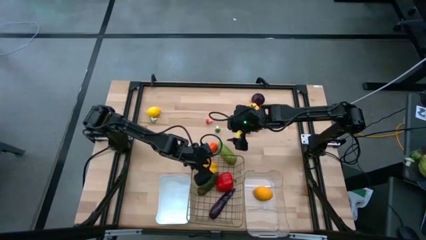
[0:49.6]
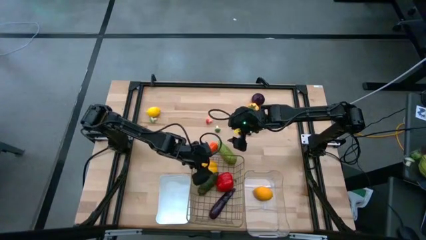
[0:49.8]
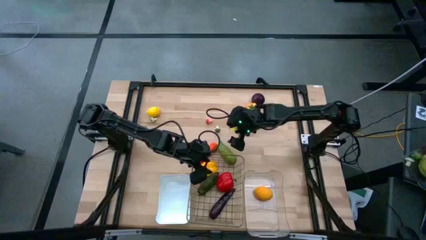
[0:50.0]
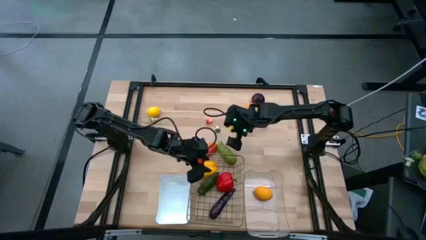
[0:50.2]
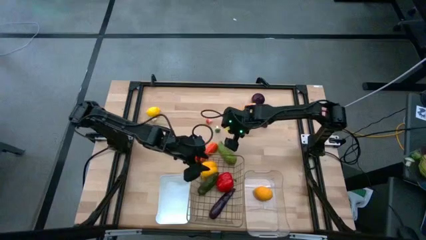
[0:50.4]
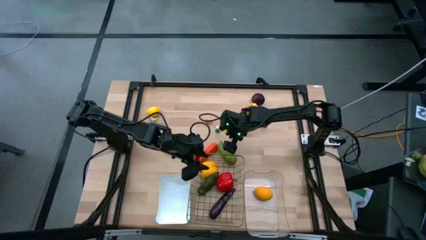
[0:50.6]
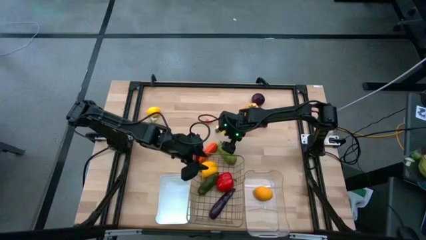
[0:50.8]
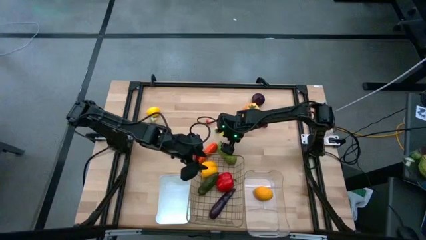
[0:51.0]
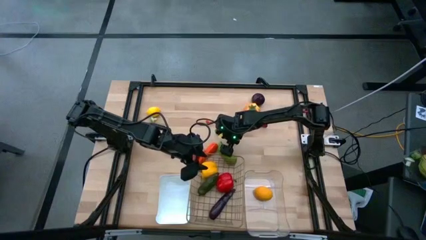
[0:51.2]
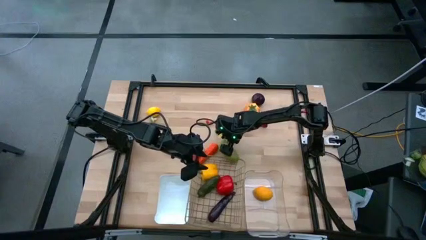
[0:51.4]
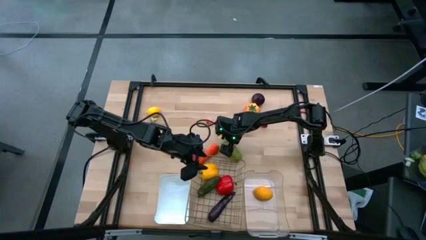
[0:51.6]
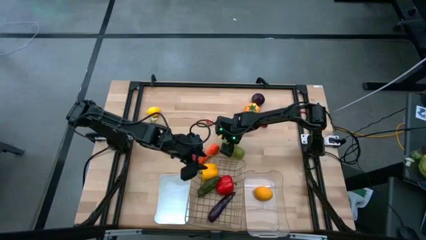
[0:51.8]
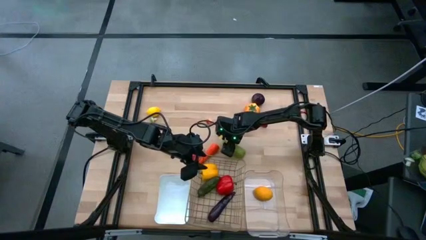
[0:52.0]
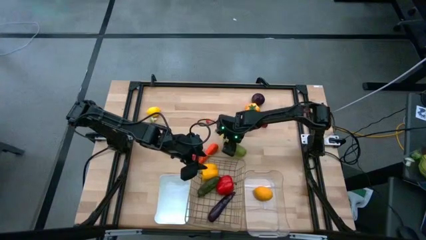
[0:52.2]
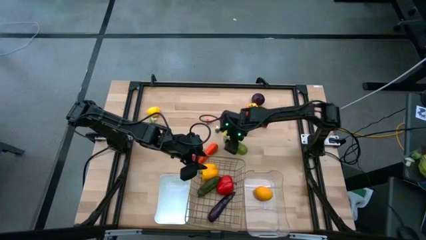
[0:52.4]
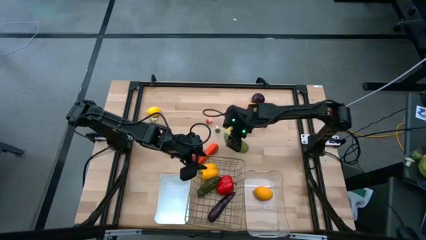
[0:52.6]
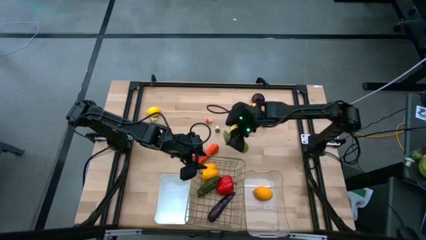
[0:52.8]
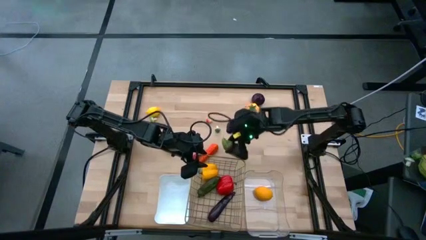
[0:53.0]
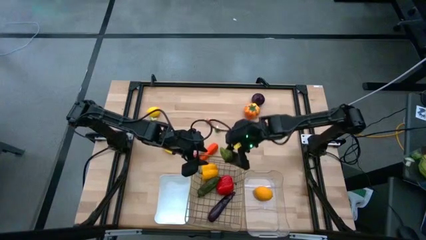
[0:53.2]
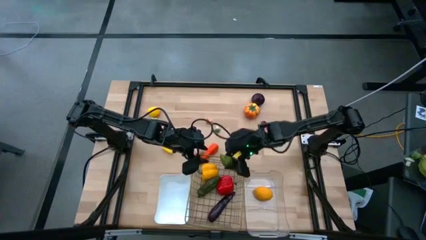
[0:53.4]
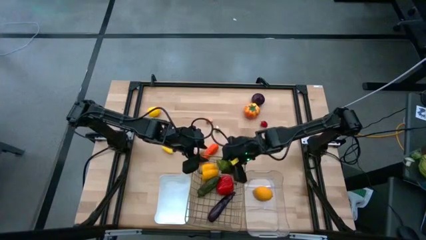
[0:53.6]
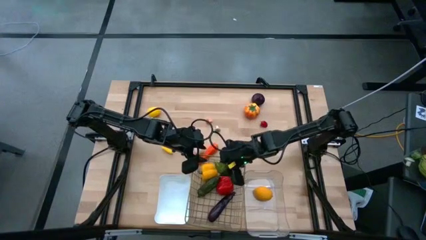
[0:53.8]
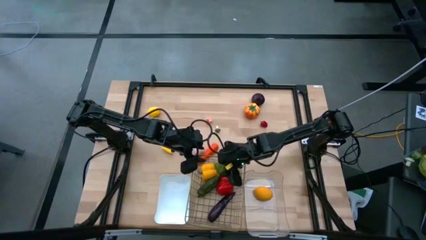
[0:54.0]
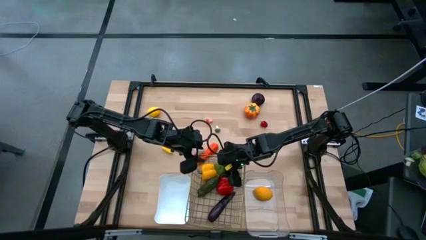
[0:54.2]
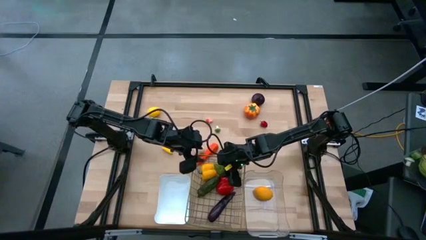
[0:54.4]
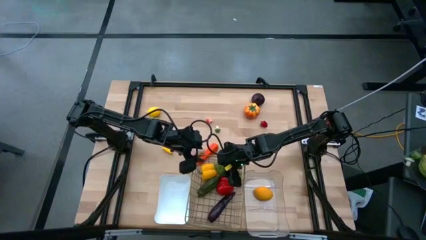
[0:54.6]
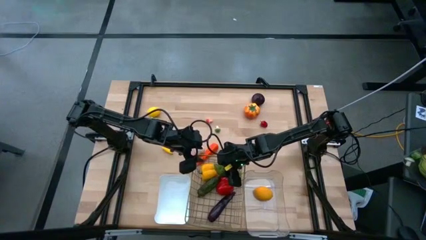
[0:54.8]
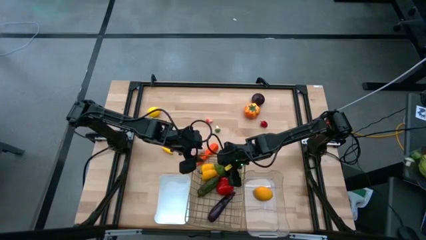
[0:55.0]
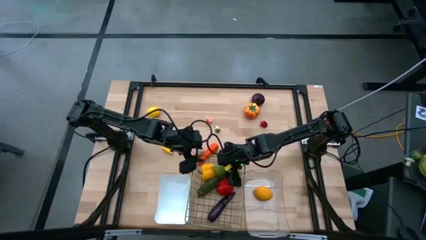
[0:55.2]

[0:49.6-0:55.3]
Task: Sort produce into baskets
Put the cucumber into the wire basket

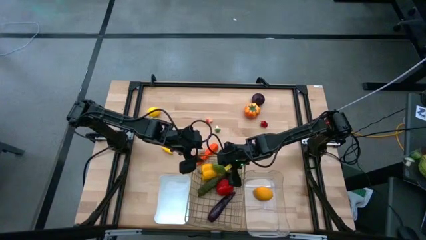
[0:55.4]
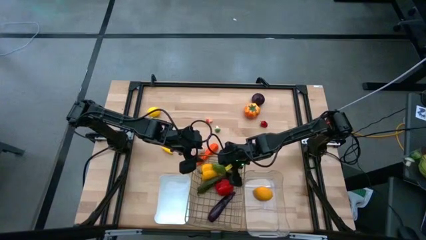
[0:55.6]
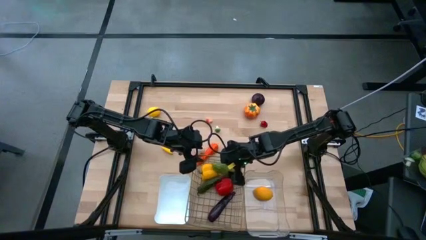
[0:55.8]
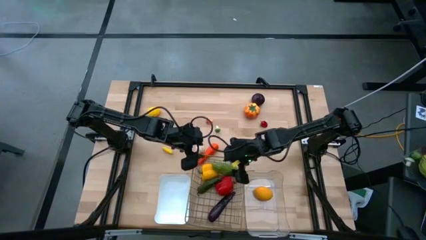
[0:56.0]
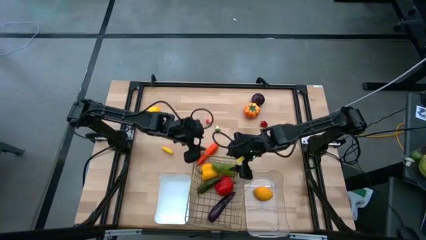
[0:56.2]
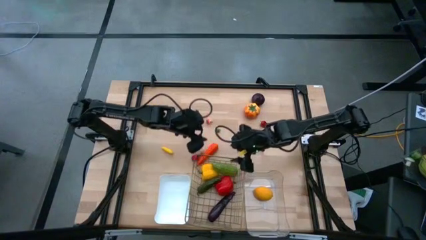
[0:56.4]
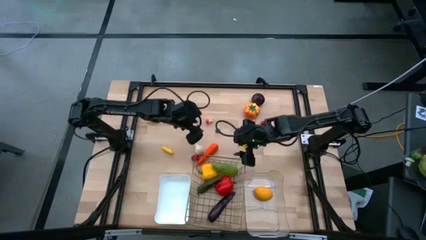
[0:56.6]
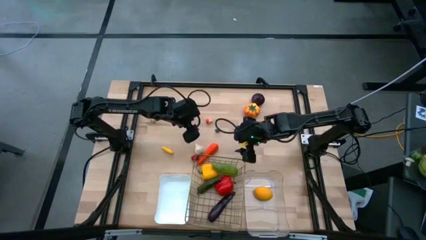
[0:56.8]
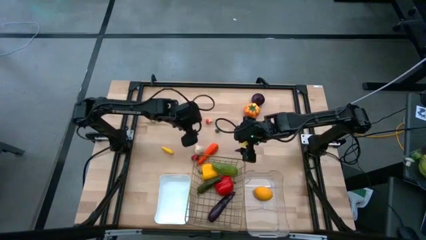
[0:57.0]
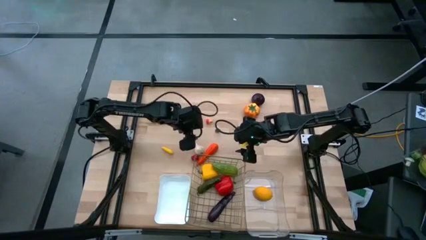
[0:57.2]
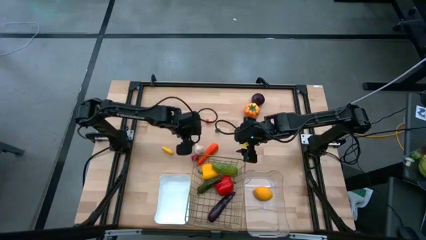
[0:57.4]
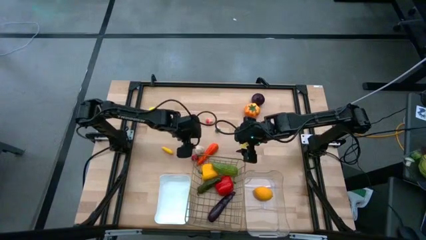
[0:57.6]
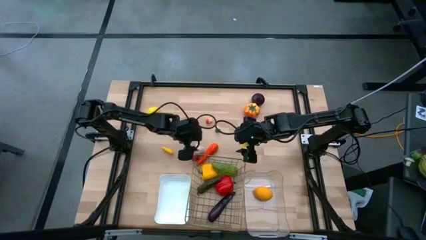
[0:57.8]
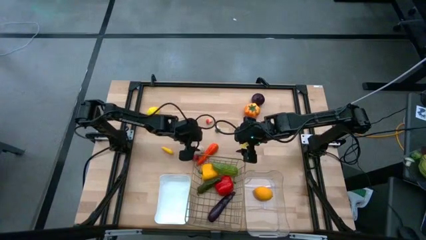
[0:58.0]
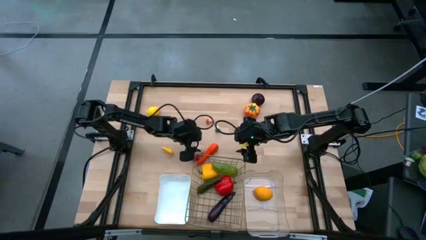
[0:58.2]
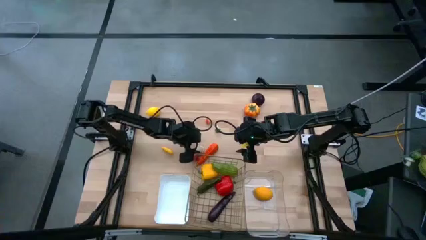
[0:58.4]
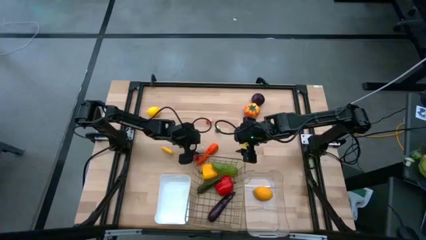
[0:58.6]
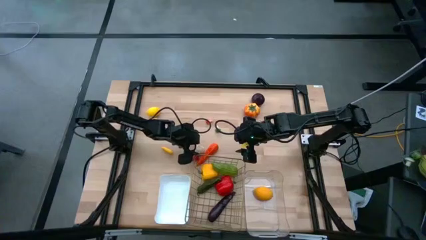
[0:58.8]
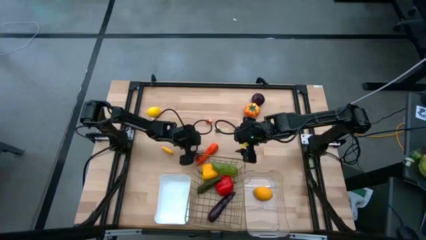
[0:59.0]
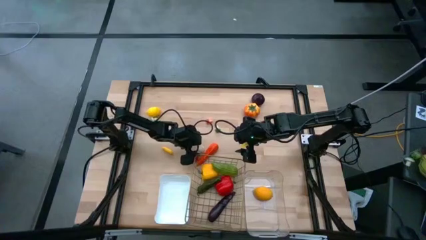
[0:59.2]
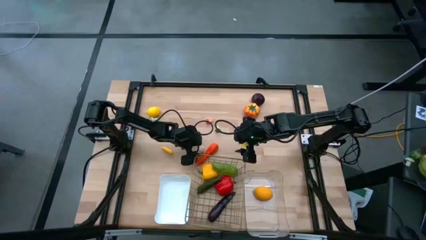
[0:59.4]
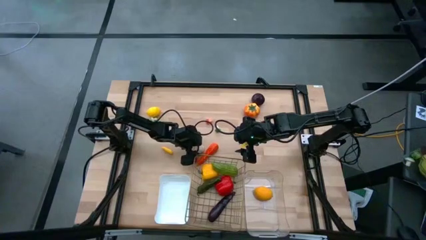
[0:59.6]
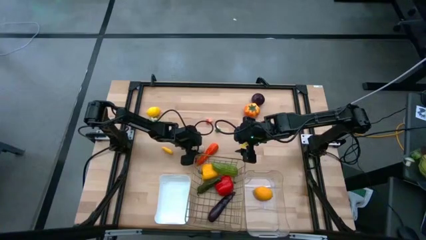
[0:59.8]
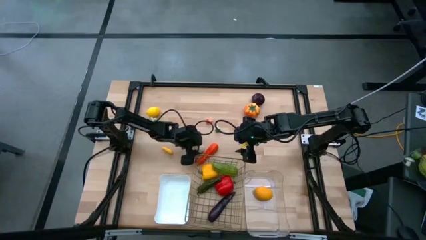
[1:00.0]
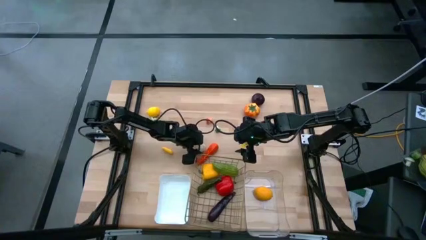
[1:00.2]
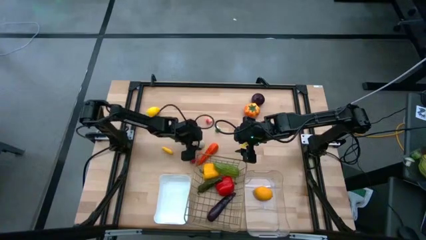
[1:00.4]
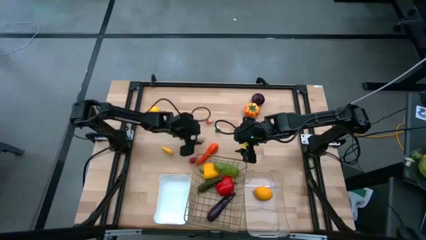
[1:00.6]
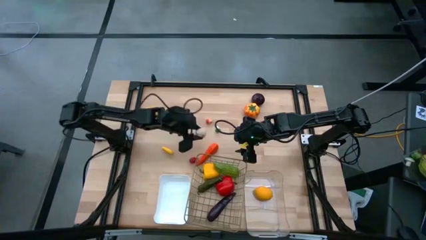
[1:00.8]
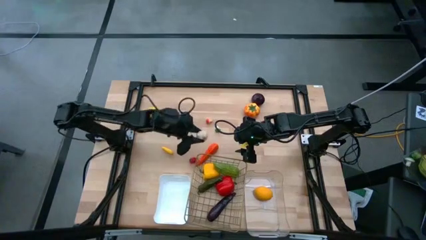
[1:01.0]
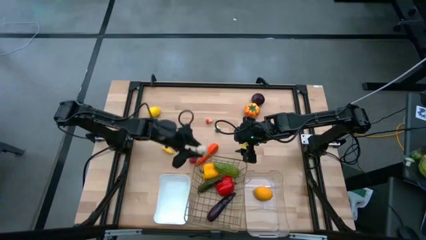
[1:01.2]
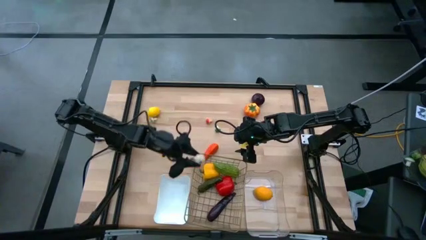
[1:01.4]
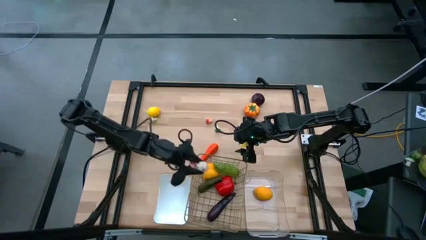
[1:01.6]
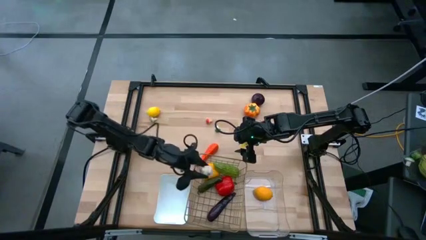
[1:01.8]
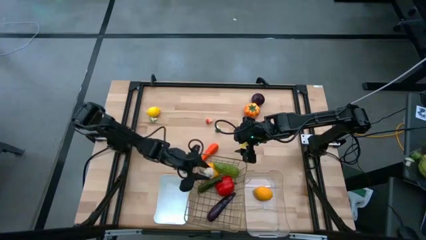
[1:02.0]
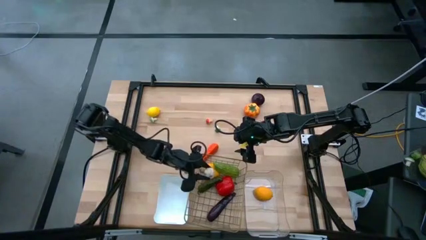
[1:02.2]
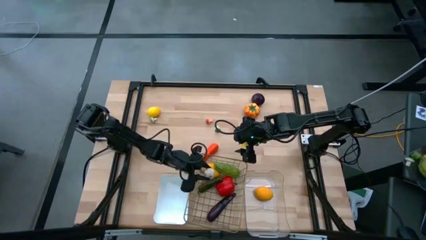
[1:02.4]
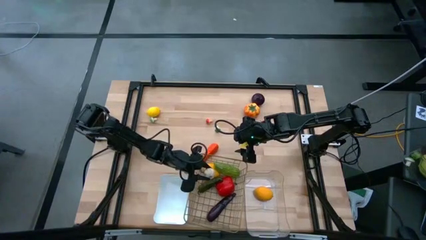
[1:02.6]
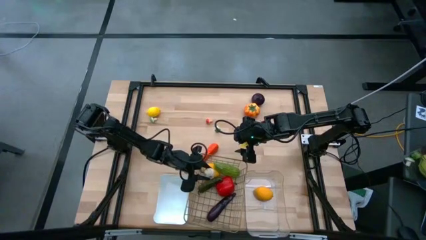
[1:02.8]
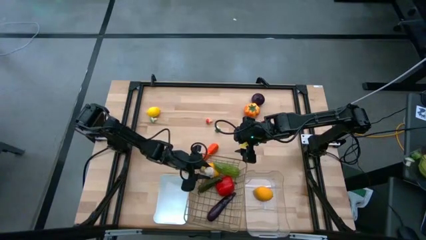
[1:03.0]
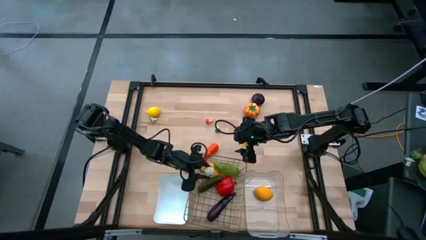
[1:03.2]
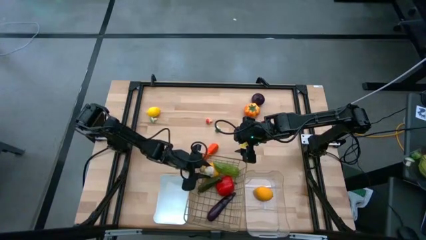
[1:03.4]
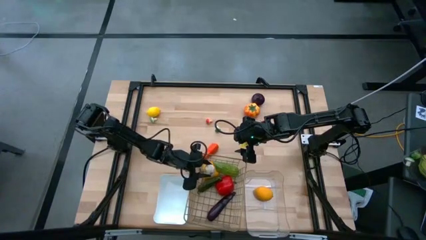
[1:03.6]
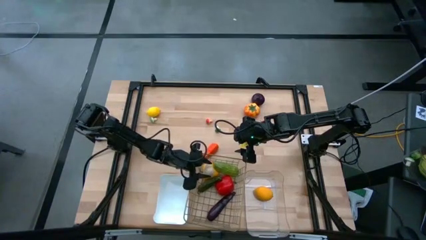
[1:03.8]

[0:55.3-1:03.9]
Put the garlic into the wire basket
